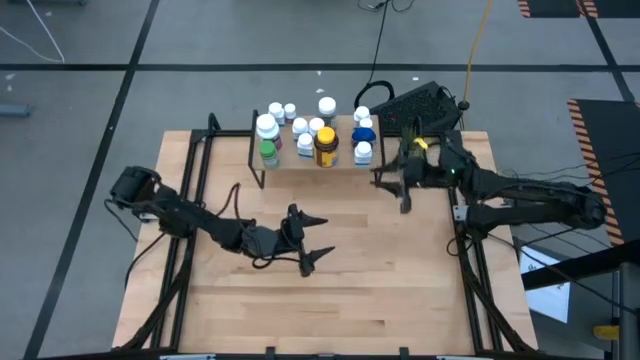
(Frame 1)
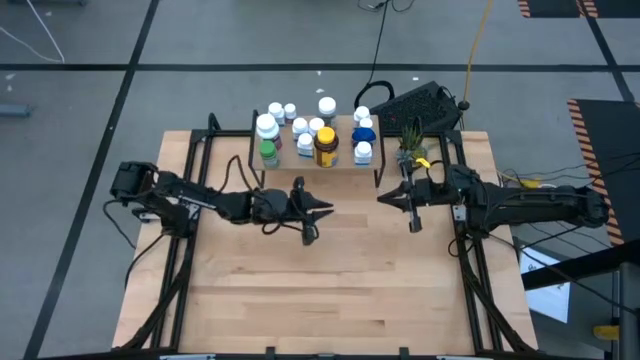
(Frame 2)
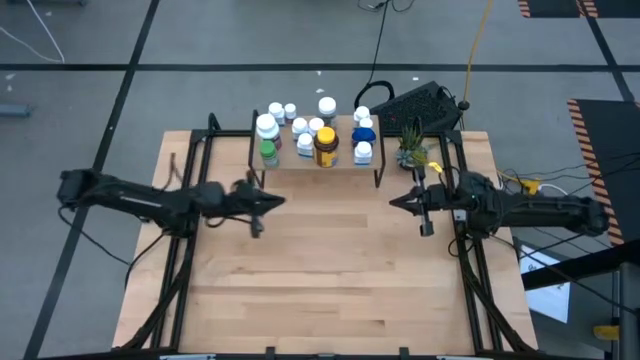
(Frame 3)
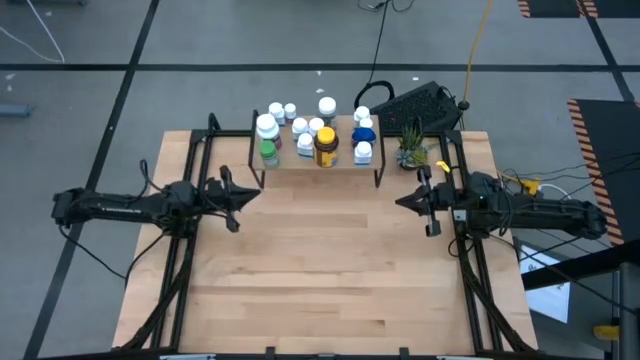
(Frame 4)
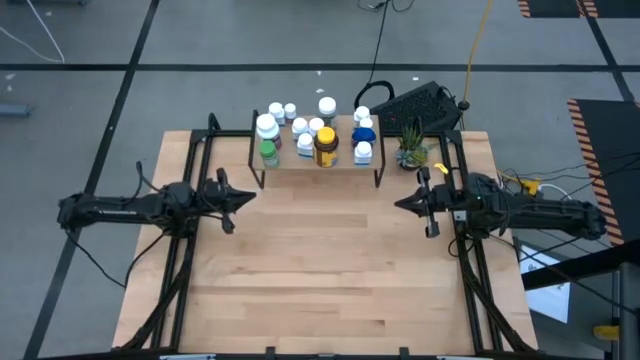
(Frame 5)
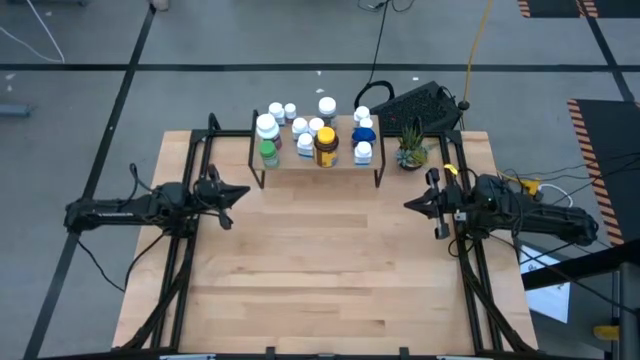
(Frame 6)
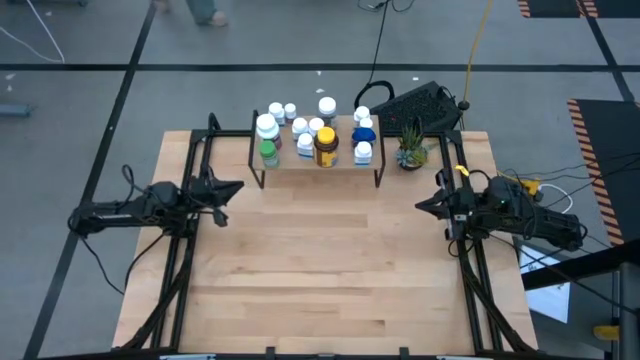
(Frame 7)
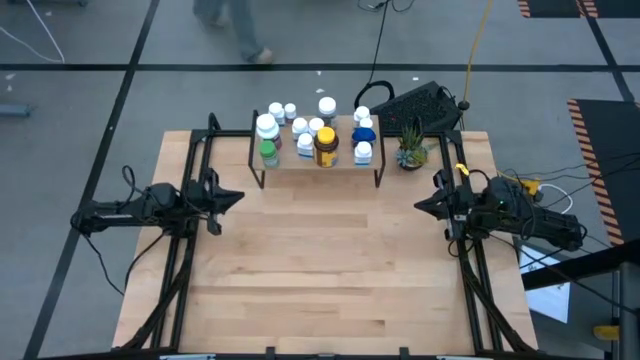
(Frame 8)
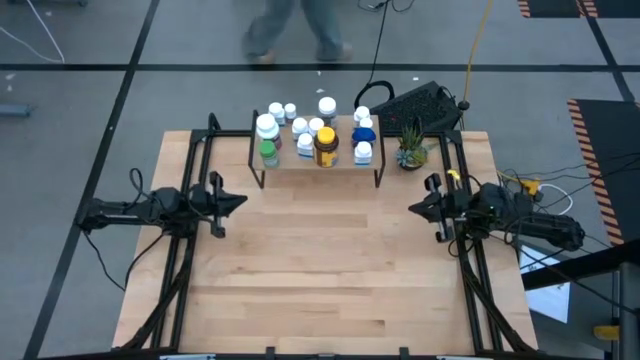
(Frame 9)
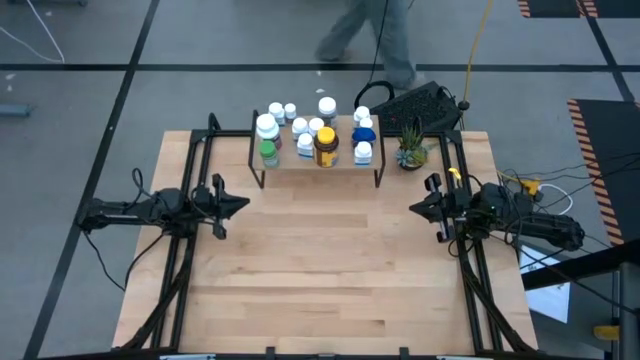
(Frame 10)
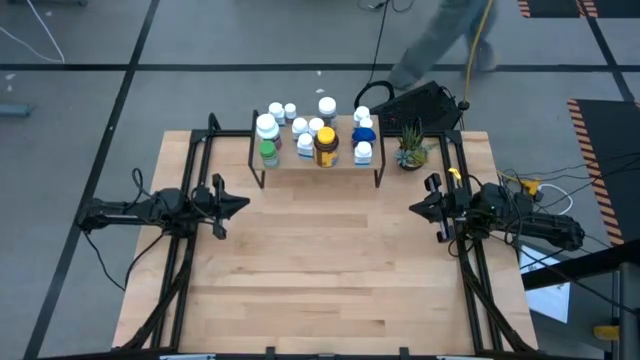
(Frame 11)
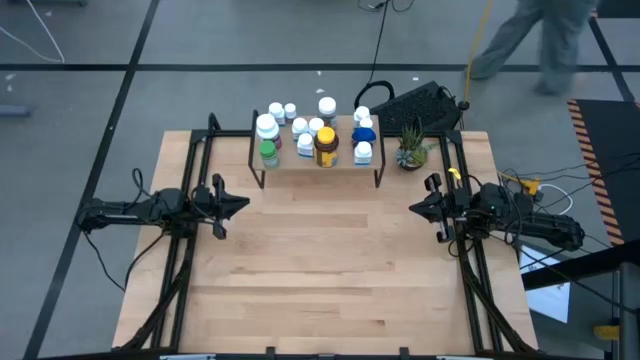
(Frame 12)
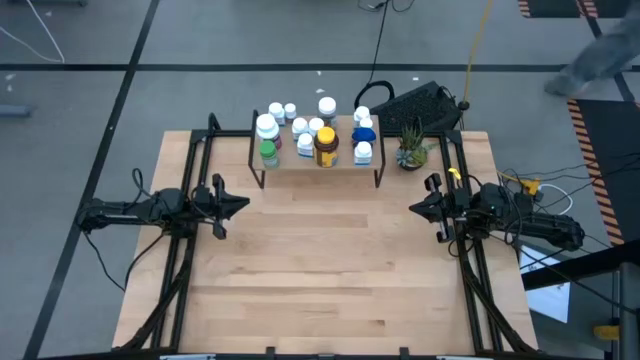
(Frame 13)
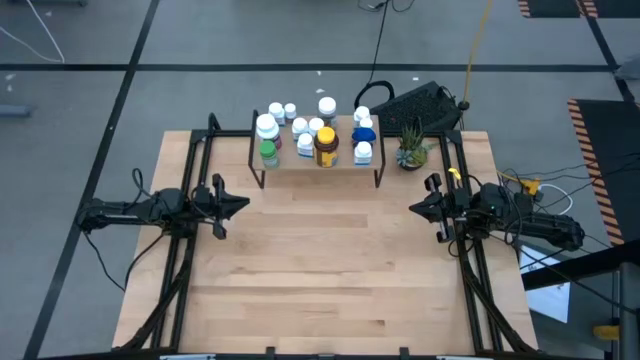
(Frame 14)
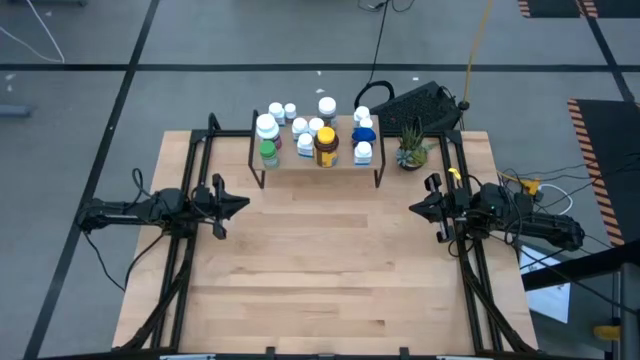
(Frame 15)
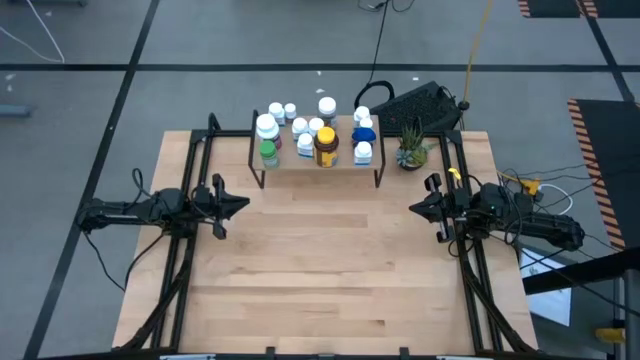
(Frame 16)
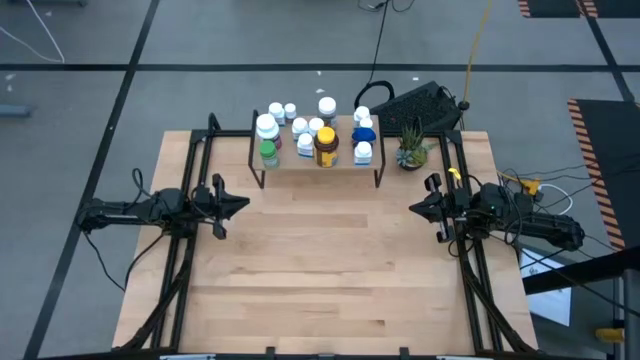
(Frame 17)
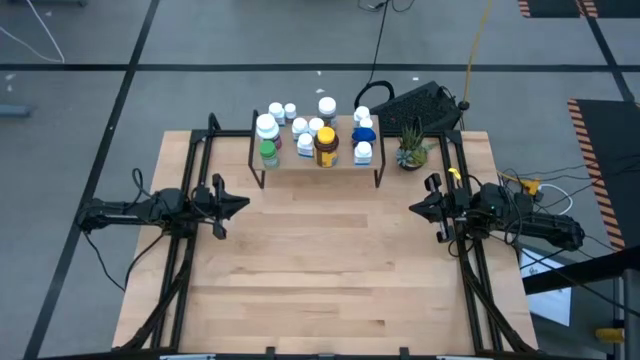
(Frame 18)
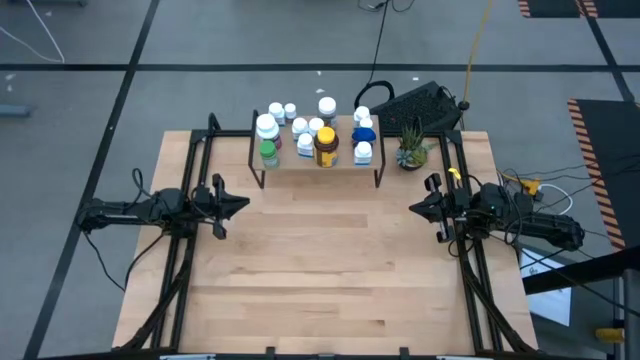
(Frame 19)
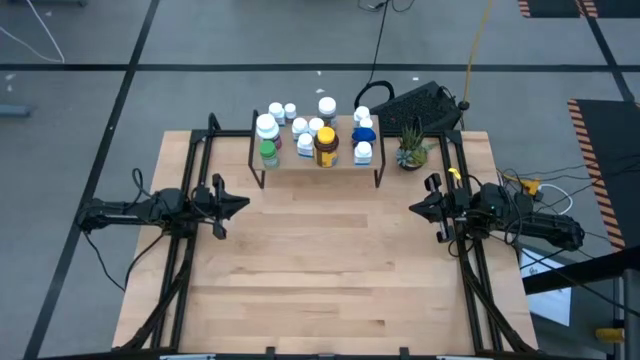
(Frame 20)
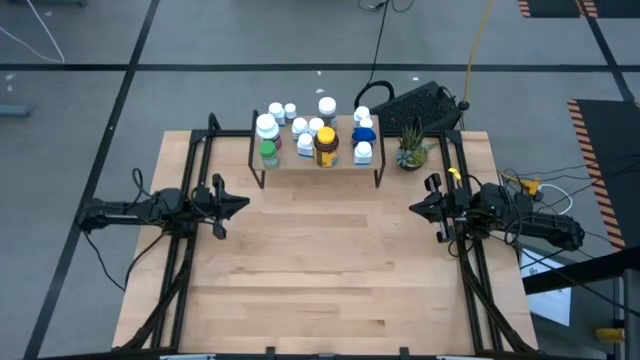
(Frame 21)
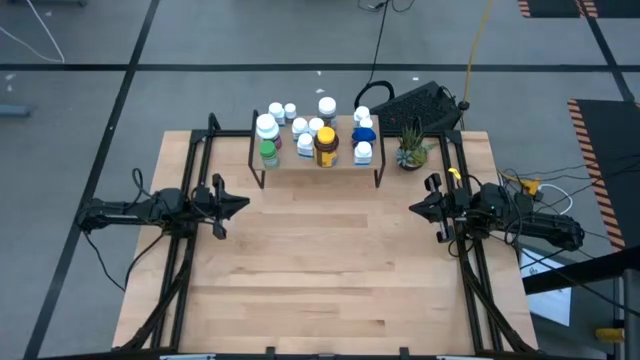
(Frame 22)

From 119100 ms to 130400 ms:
Task: Pick and place medicine bottles onto shelf by color
Return to Home Position

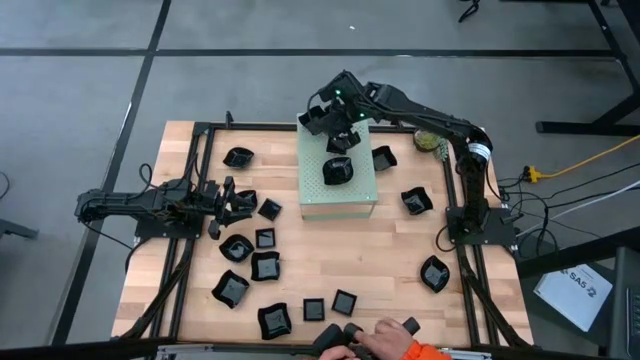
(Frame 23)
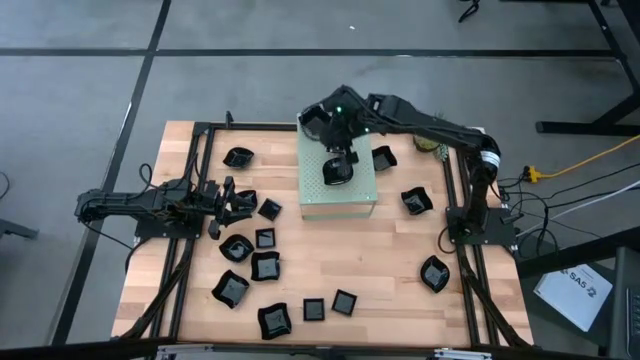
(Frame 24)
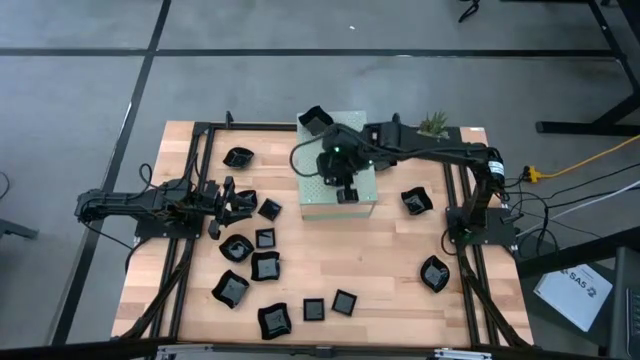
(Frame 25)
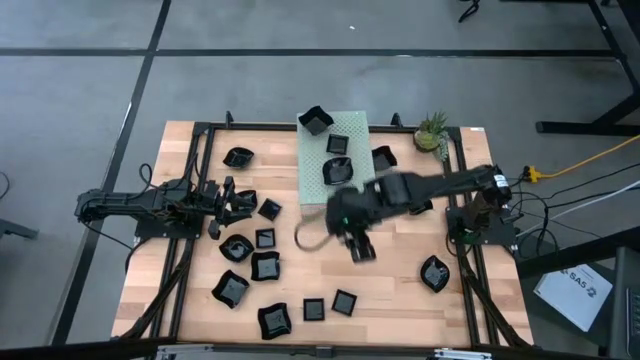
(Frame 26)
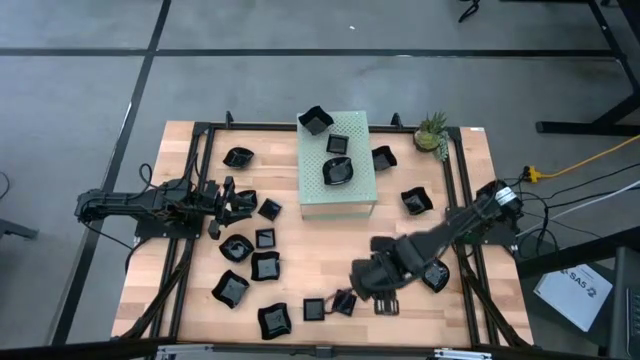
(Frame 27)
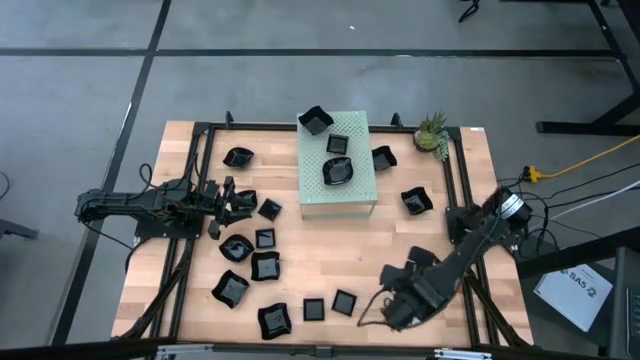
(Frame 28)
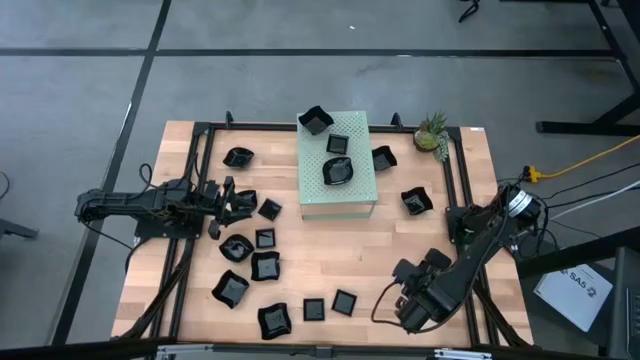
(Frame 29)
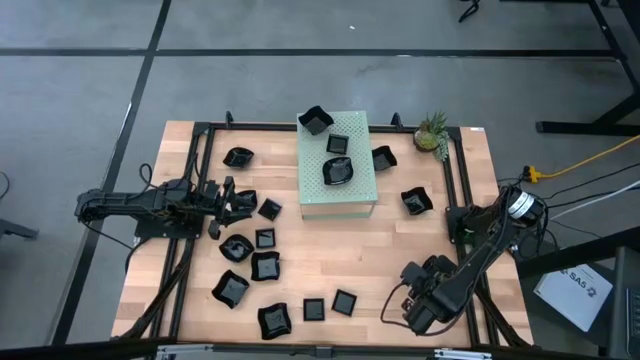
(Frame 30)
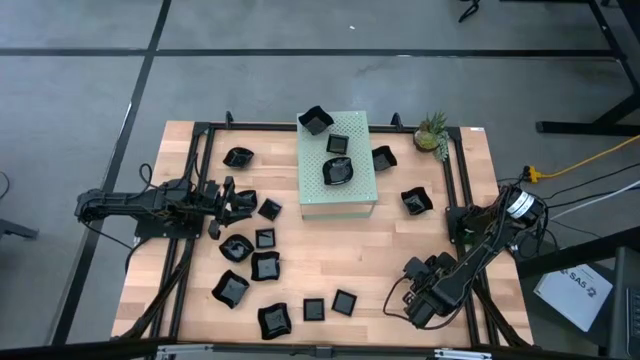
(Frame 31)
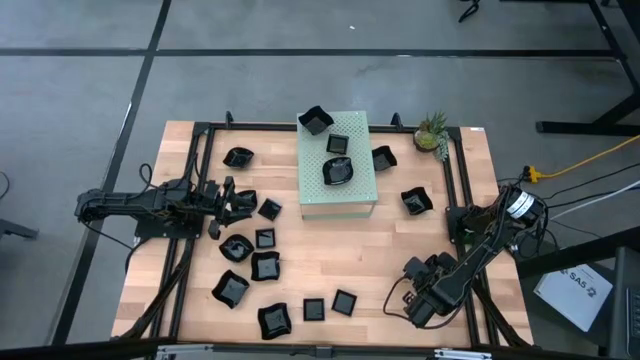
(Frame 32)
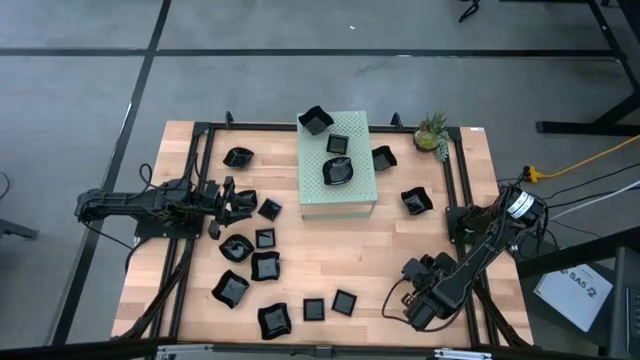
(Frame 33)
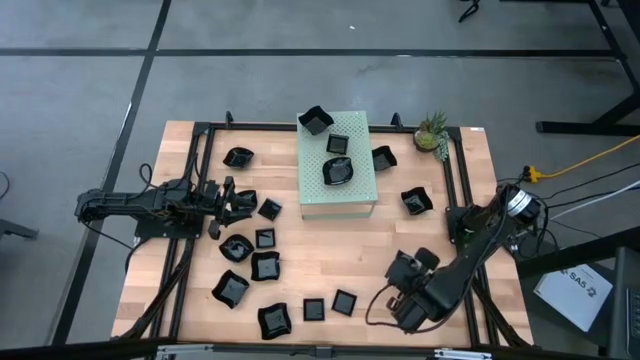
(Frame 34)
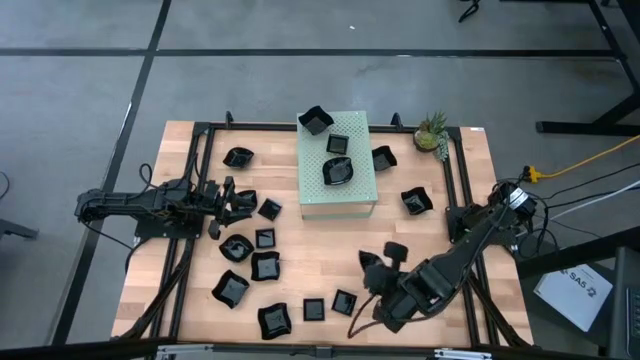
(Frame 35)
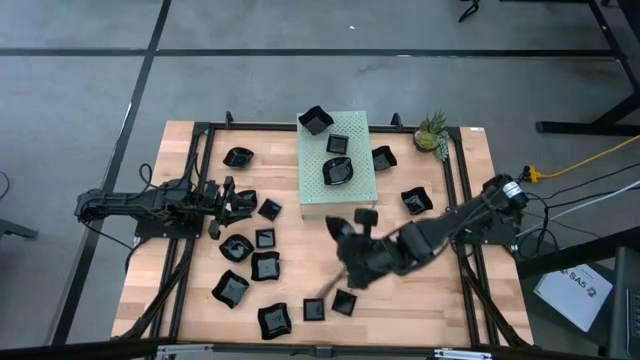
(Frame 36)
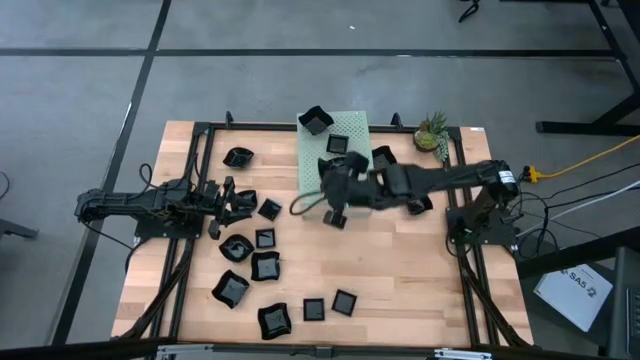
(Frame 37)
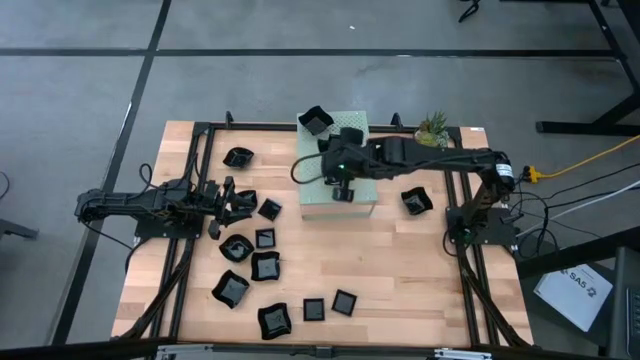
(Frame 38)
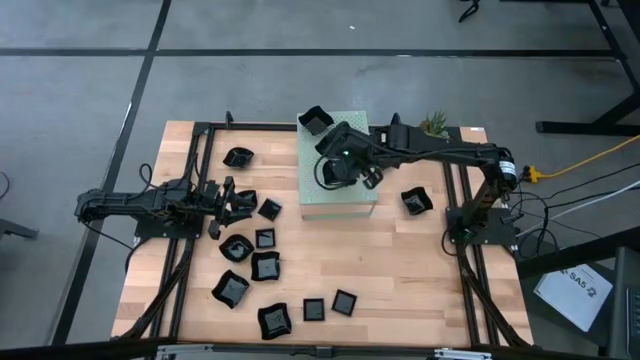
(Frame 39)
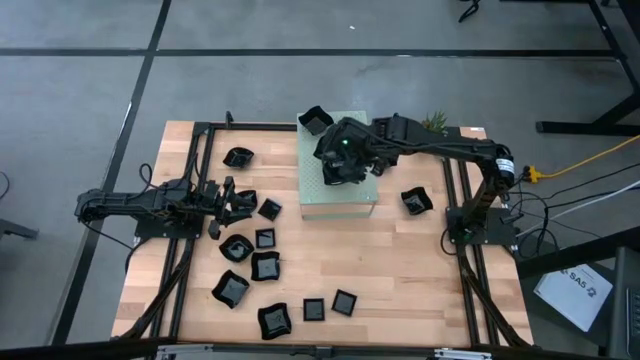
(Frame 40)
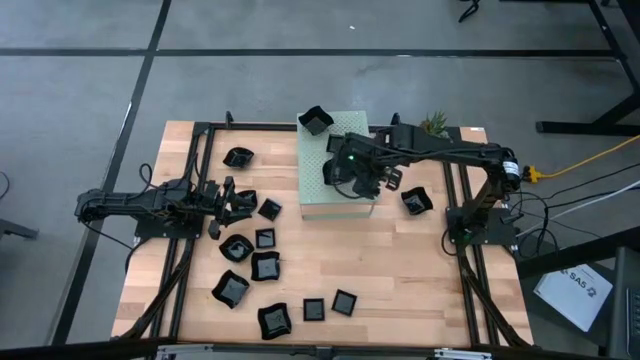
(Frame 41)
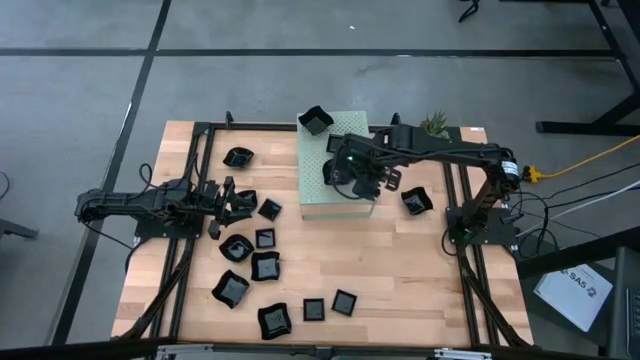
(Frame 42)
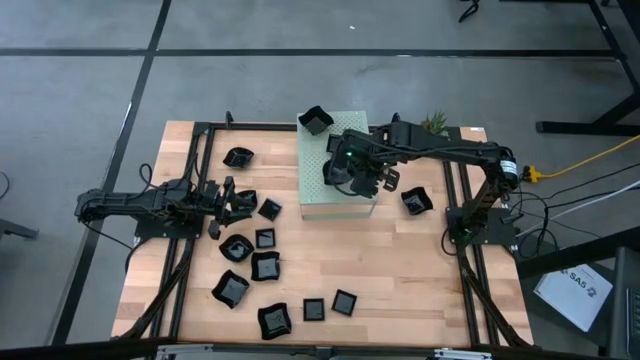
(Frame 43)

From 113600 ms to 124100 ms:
Task: Pick & Place Mini shaped plates
Stack the black leaf shaped plate on top of the black leaf shape plates on the shelf
